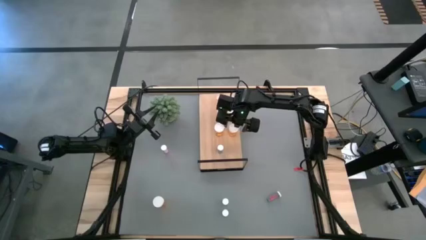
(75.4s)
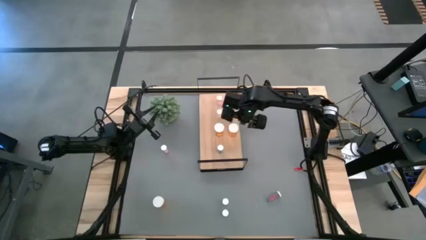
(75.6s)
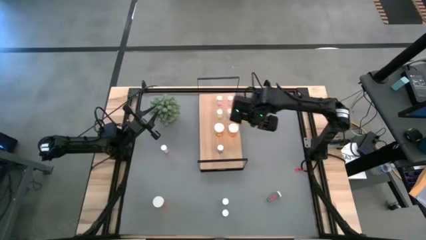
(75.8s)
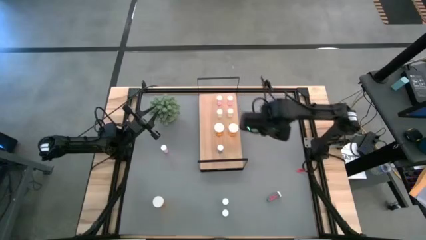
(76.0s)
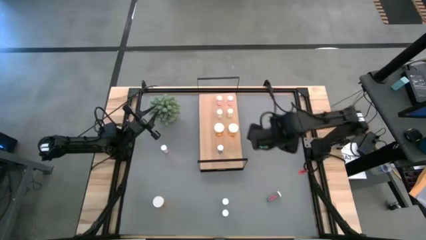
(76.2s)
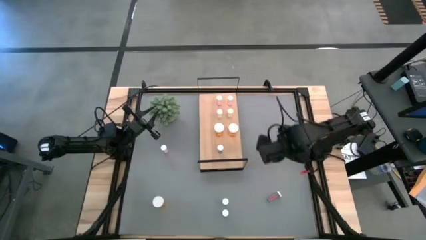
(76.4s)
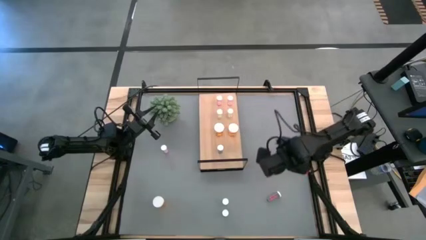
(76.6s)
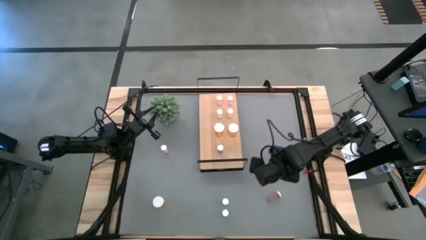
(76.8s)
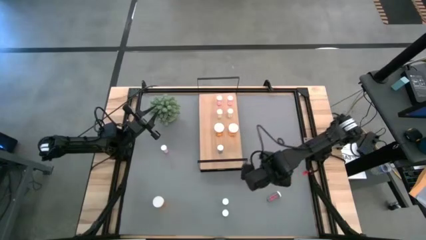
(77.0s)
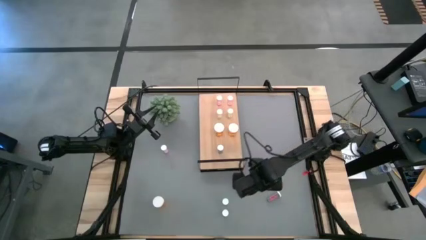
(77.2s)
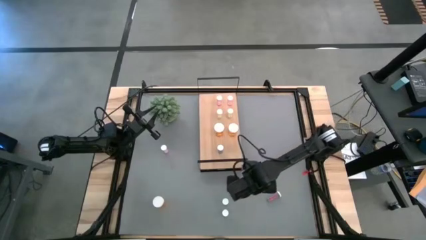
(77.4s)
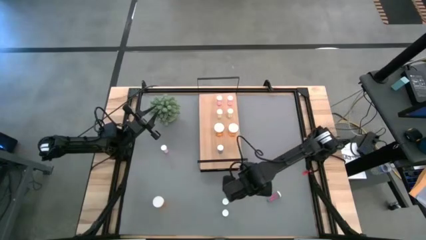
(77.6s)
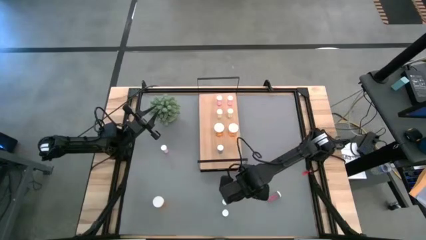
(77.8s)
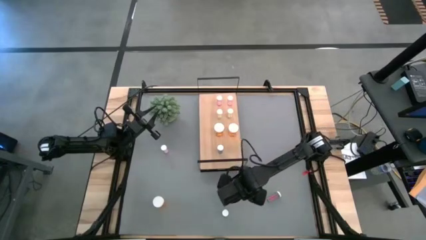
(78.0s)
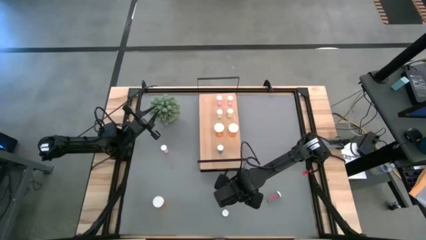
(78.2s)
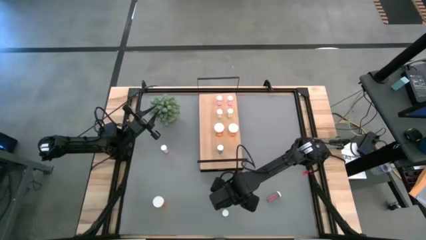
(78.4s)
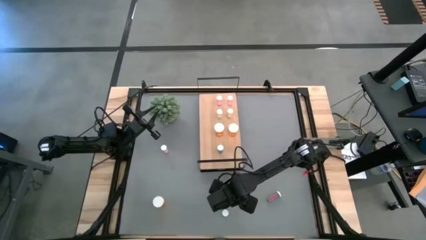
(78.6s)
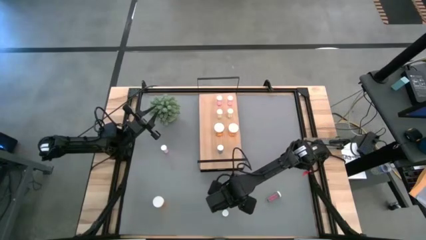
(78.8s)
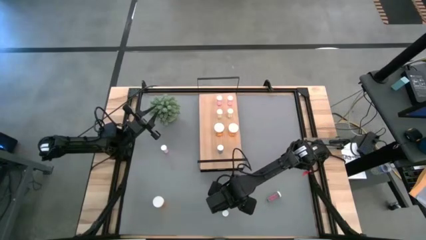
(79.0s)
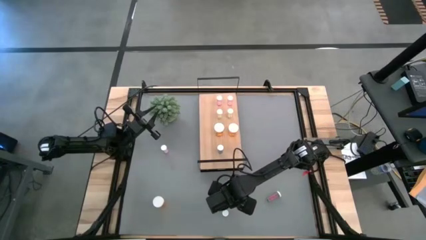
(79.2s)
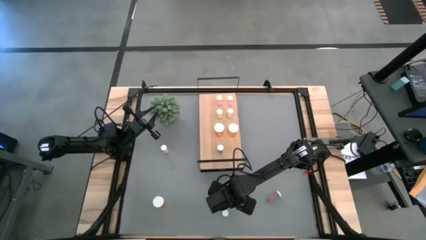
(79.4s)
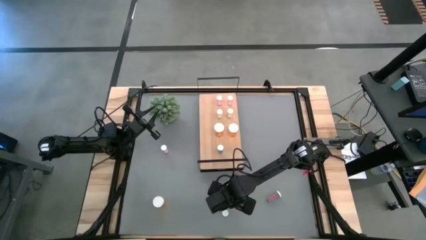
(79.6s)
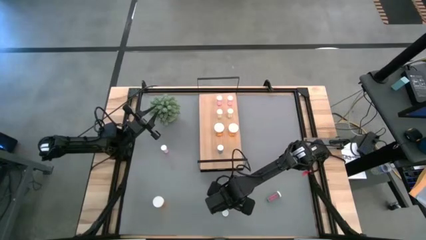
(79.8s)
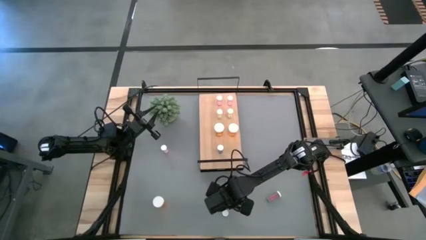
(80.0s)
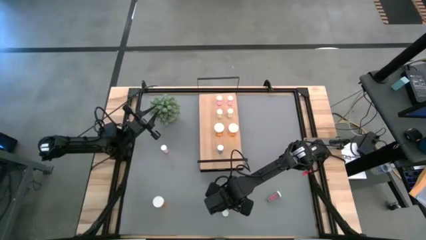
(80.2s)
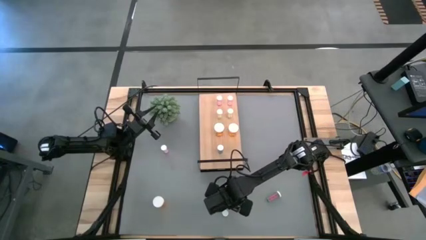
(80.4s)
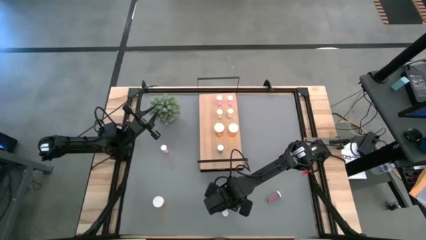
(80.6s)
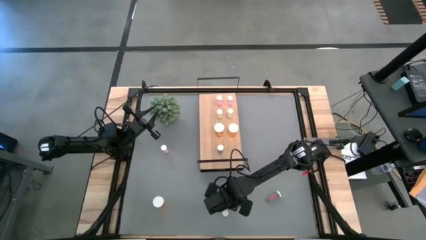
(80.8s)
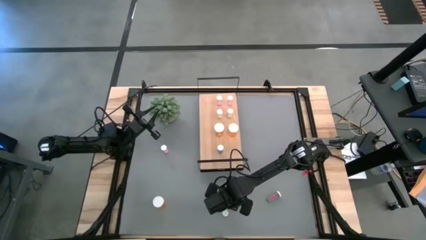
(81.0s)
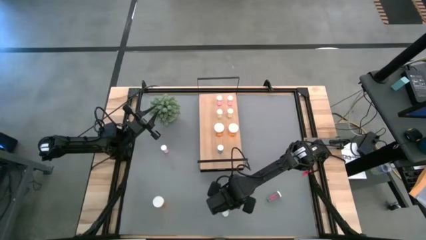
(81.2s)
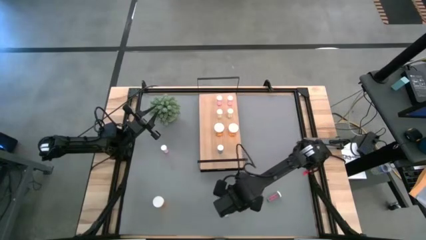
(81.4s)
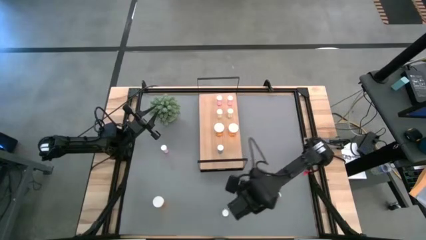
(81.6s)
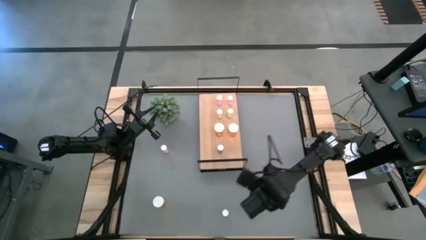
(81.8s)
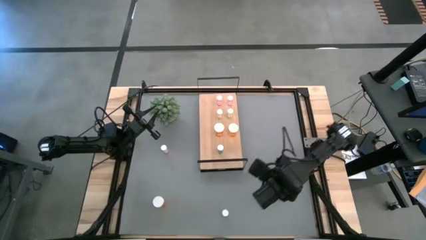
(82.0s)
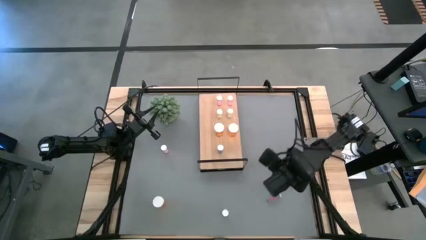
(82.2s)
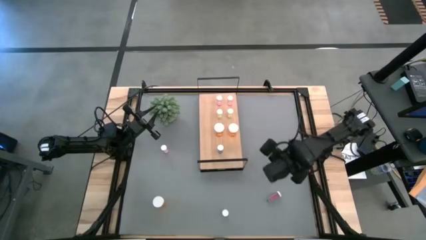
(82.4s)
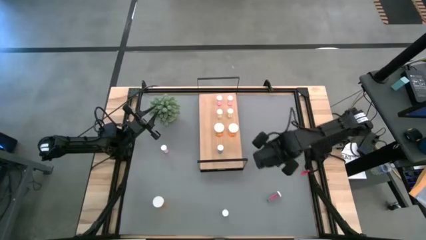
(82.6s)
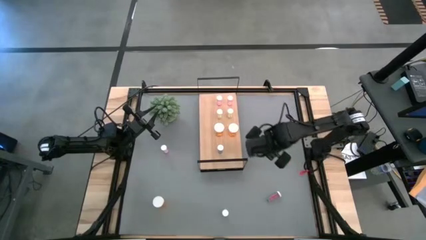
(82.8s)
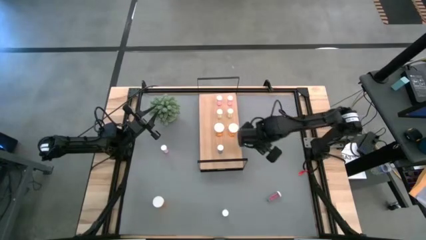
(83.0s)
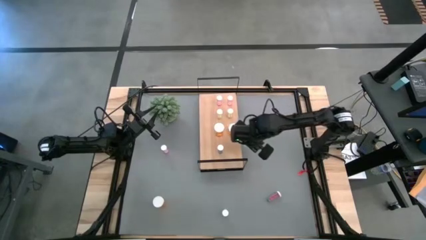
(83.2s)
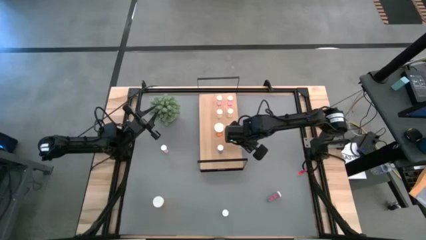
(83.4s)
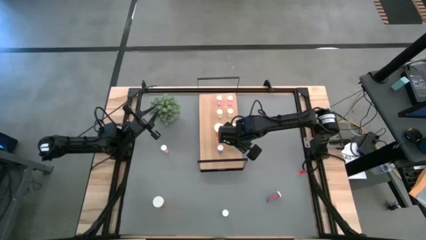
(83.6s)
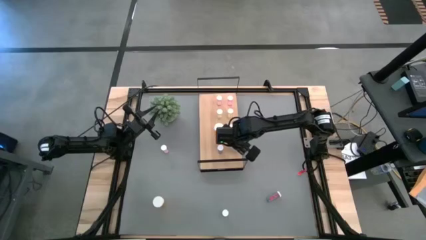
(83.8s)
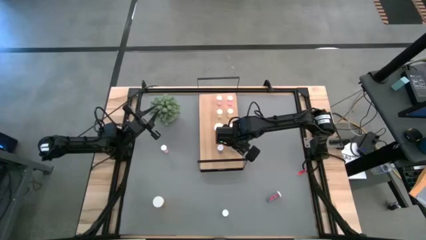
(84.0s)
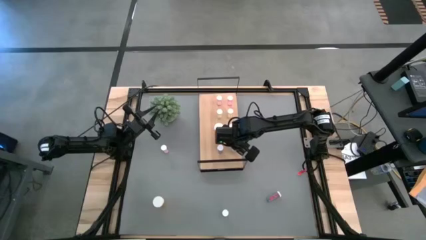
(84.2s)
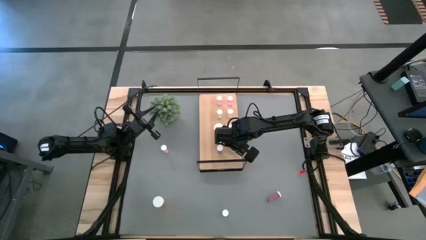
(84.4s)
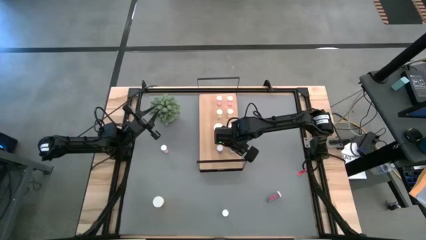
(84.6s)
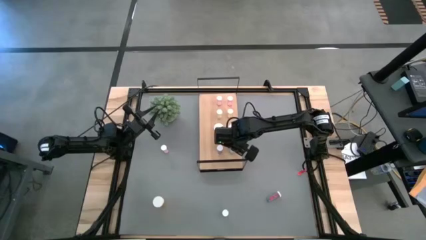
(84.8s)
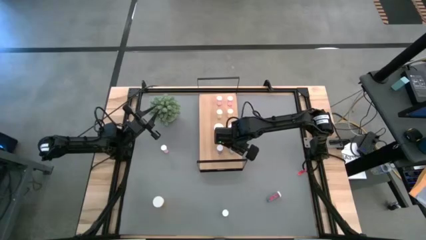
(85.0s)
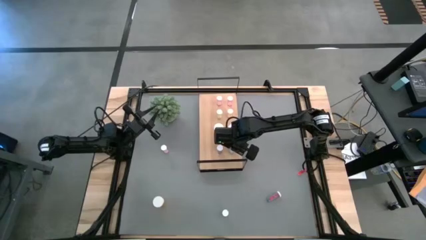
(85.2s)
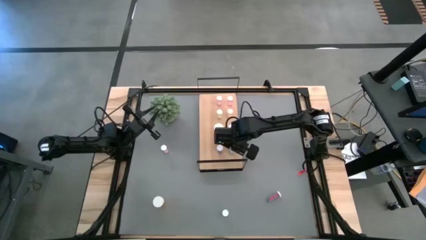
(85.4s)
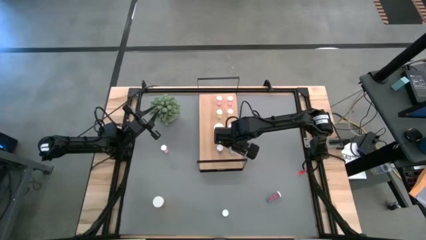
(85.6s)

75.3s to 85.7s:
Task: Pick and place medicine bottles onto shelf by color
Put the left blue pill bottle aligned with the other blue pill bottle on the shelf
